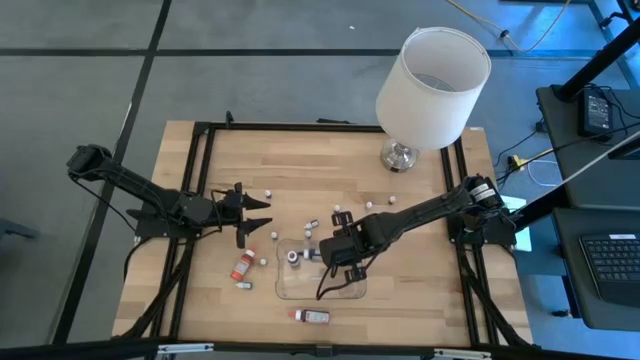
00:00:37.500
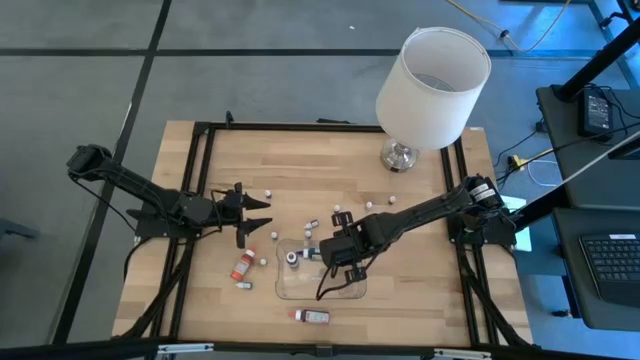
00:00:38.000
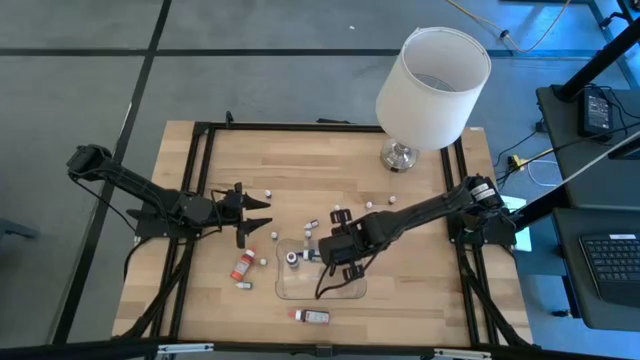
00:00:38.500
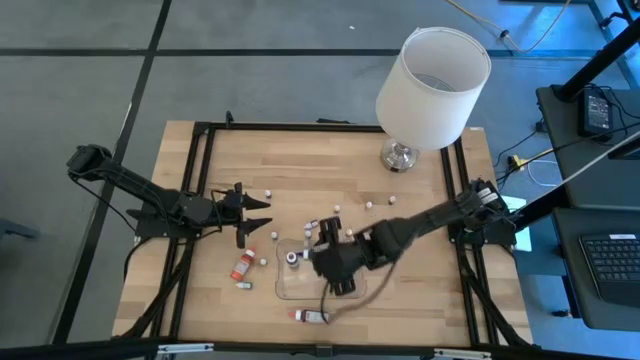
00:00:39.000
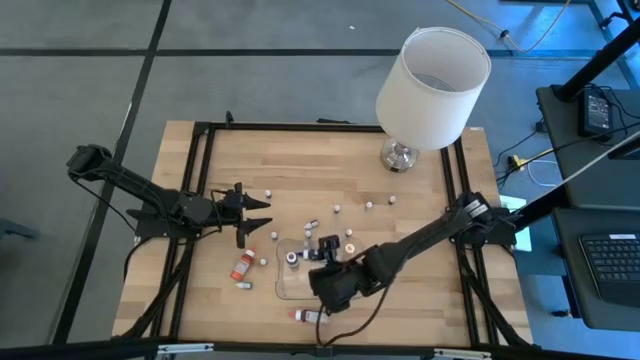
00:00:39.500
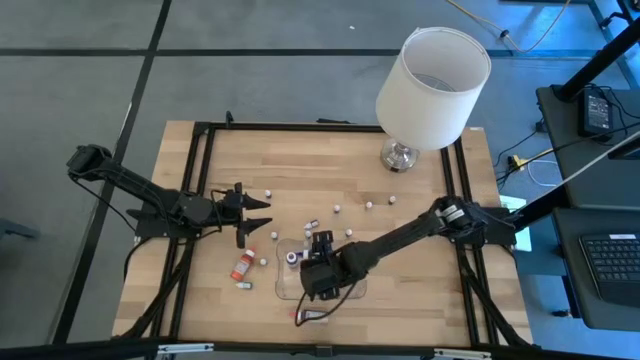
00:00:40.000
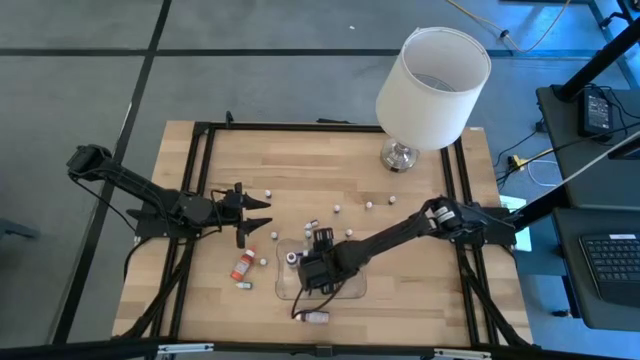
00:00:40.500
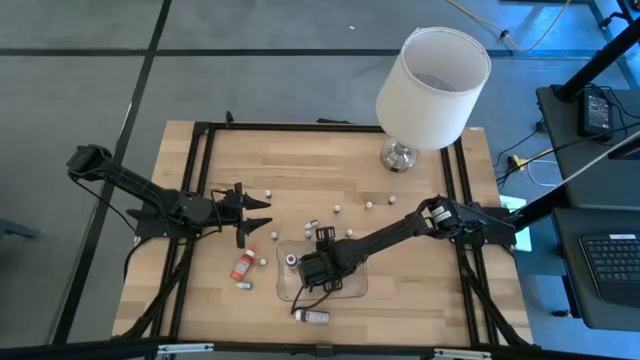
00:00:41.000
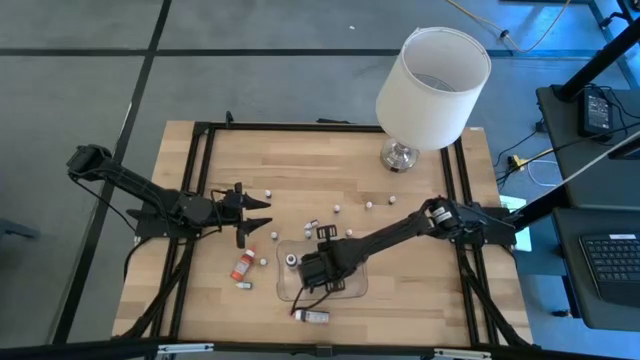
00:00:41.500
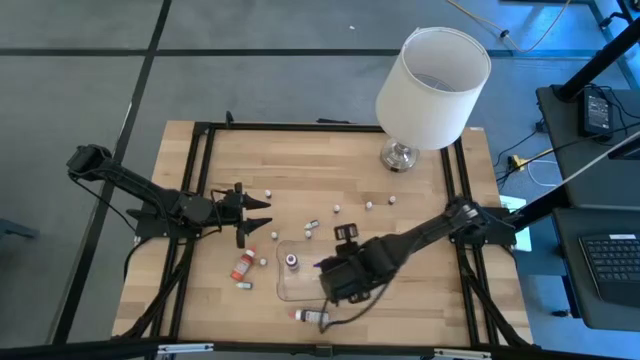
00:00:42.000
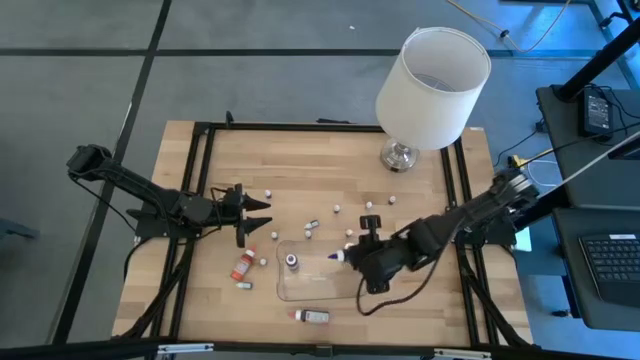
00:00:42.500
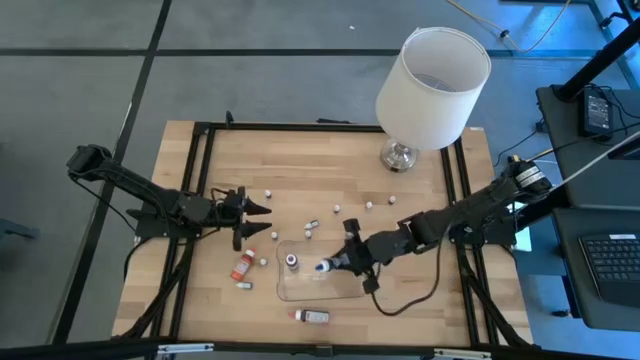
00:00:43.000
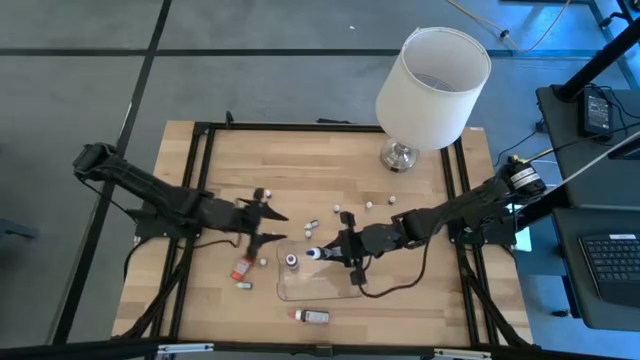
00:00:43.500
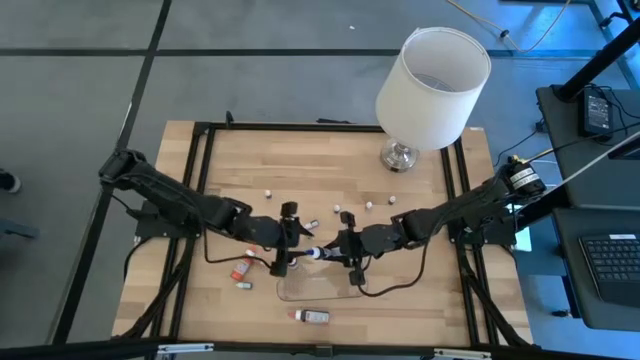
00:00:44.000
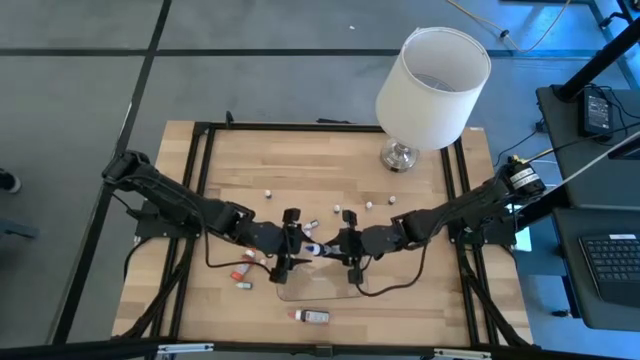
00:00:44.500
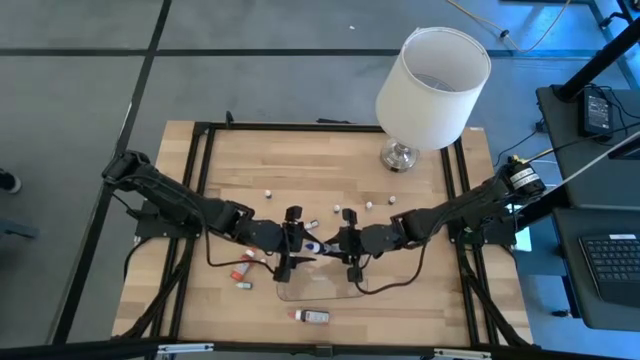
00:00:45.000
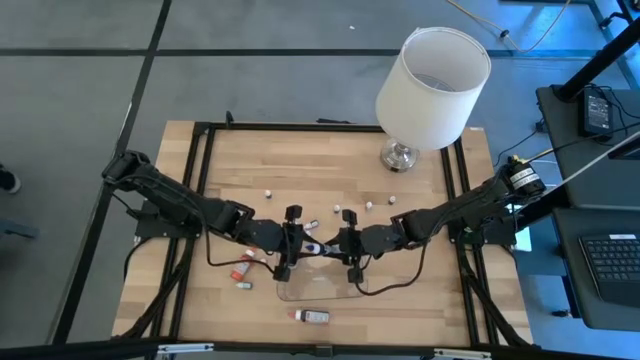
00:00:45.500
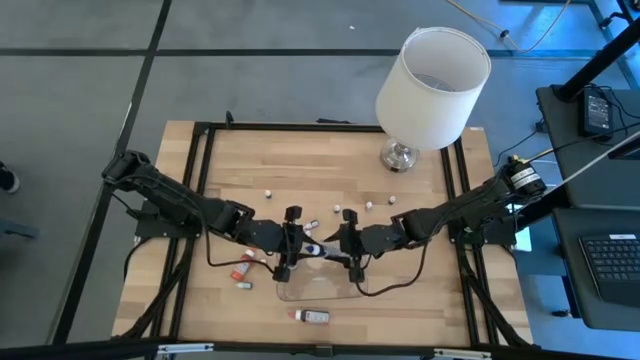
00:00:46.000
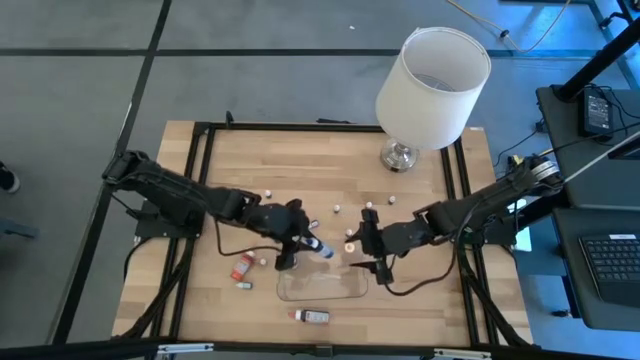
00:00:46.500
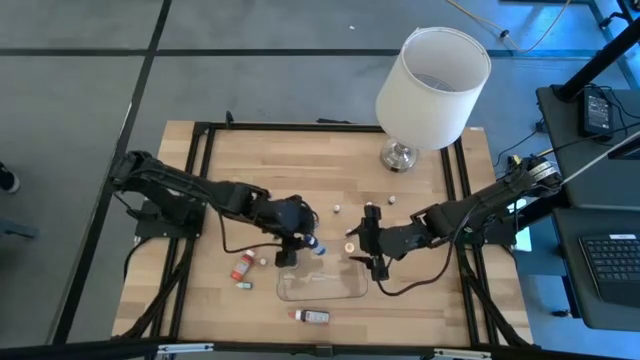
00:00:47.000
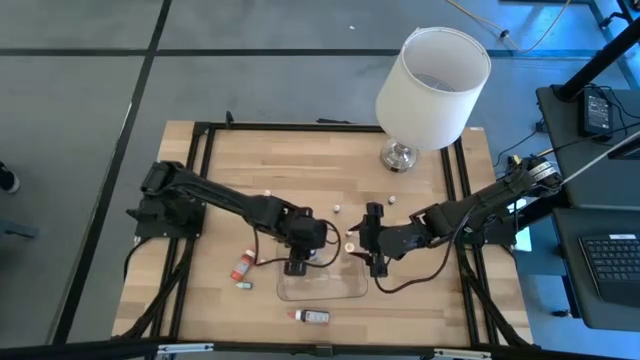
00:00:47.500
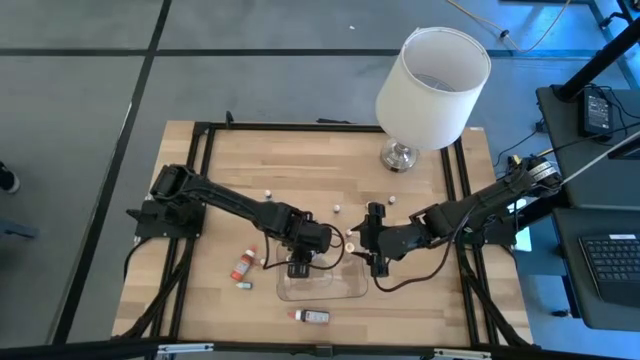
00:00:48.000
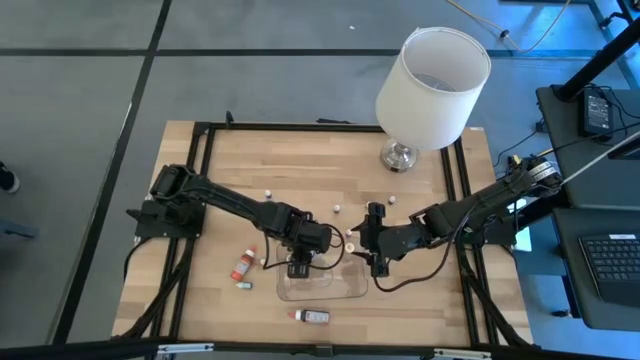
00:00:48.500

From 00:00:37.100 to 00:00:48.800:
Task: Pick & Place food coloring
Put the big blue food coloring bottle into the container

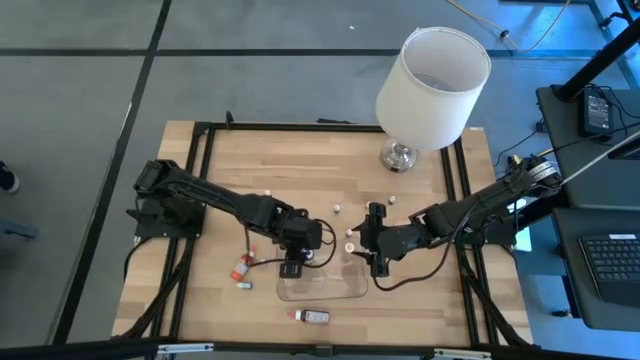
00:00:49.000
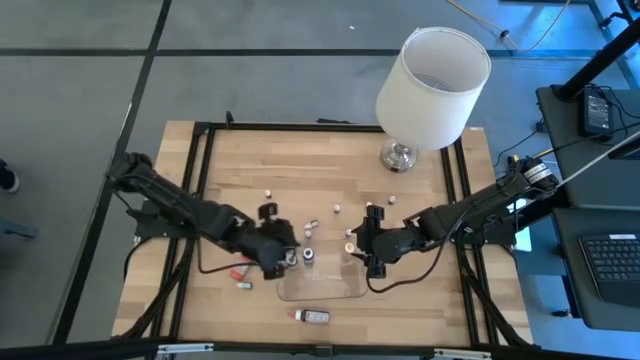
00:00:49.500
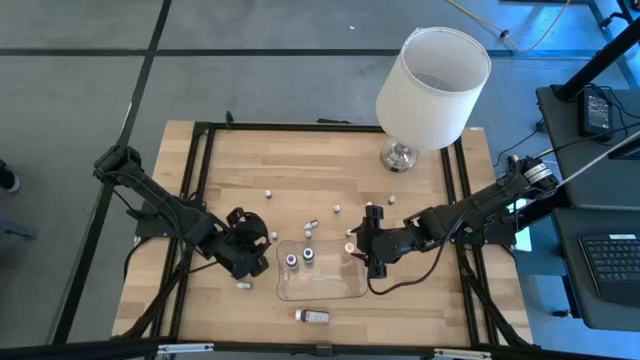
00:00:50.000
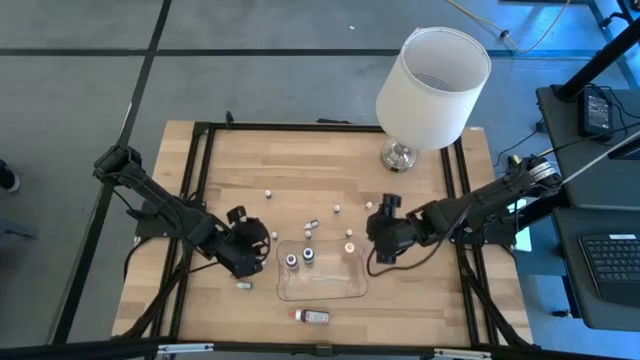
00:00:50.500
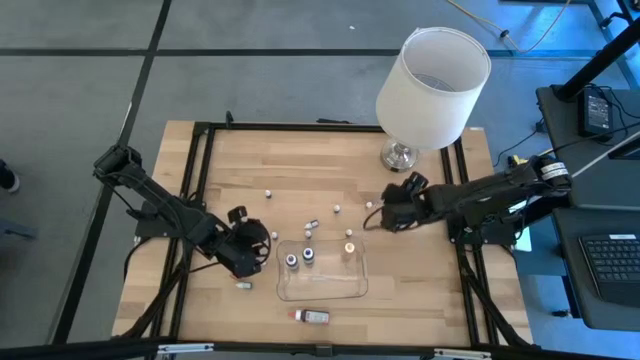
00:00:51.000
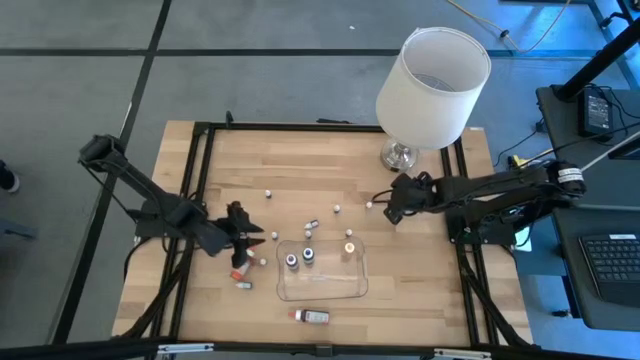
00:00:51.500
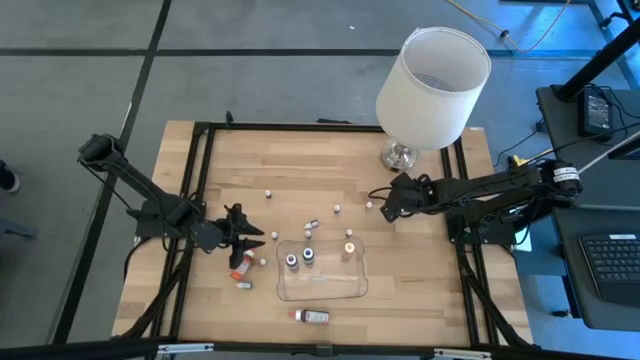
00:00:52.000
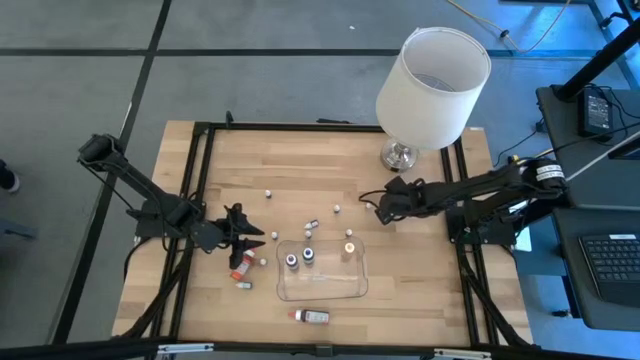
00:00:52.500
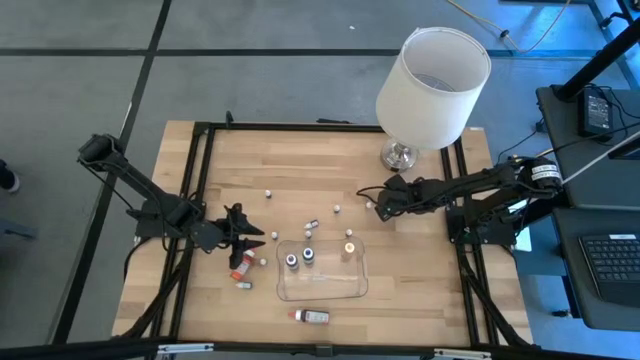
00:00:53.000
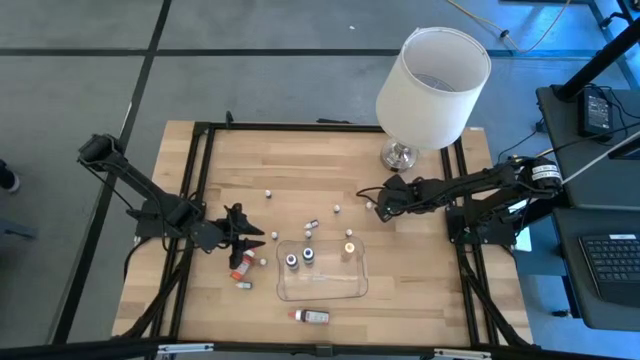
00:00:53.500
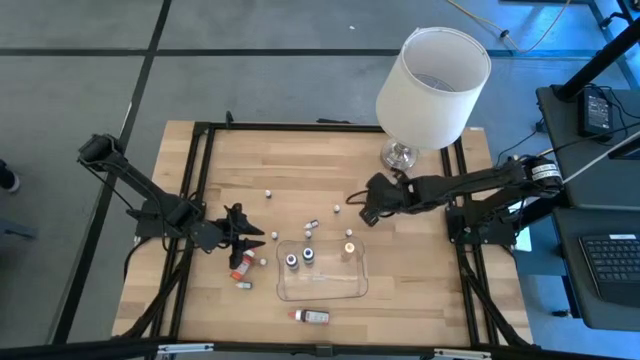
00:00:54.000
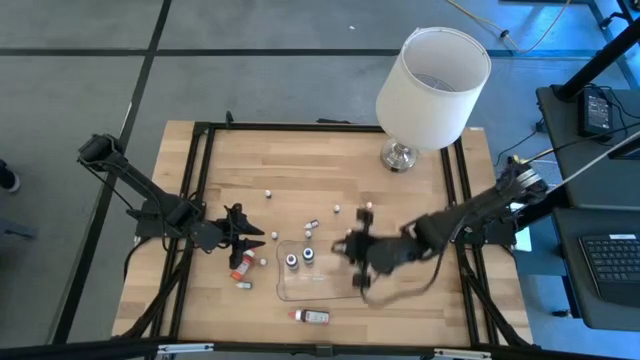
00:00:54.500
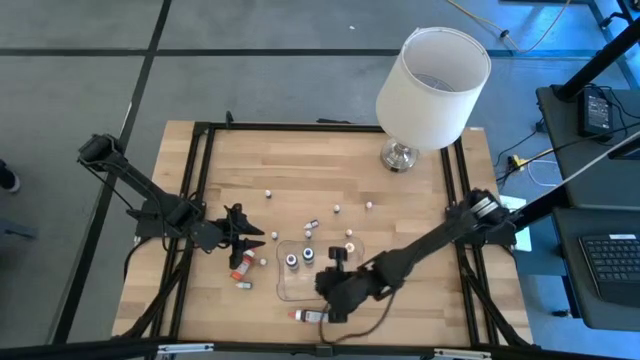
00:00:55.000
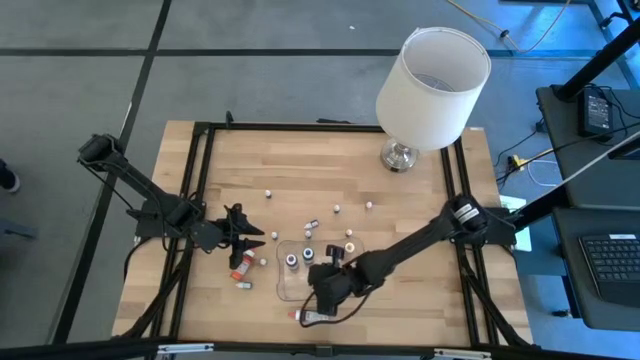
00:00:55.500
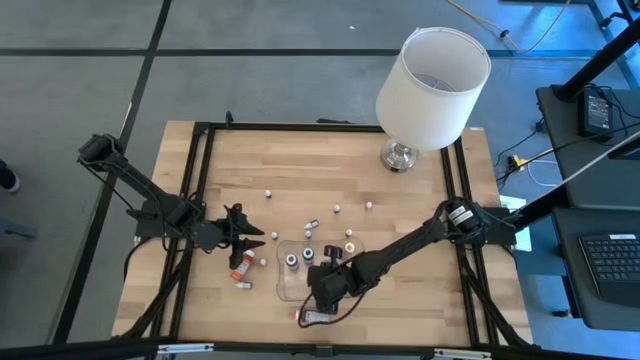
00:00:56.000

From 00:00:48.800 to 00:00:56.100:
Put the small pink food coloring bottle into the container

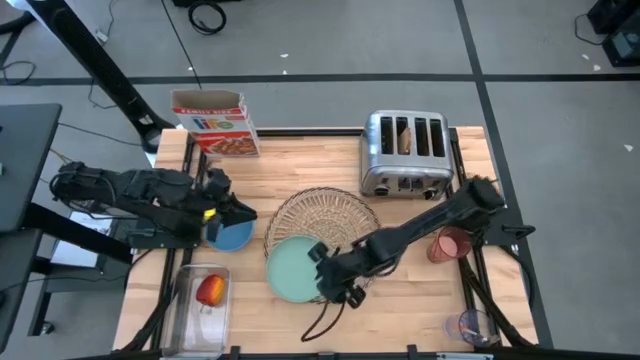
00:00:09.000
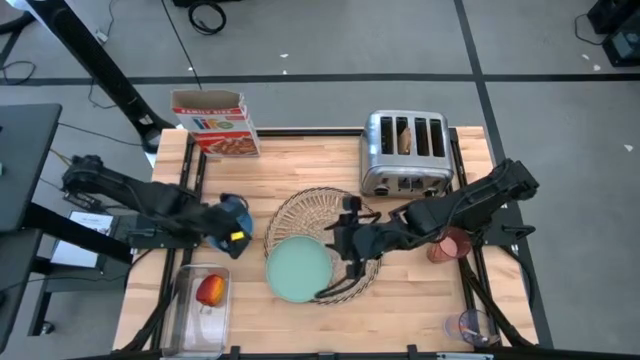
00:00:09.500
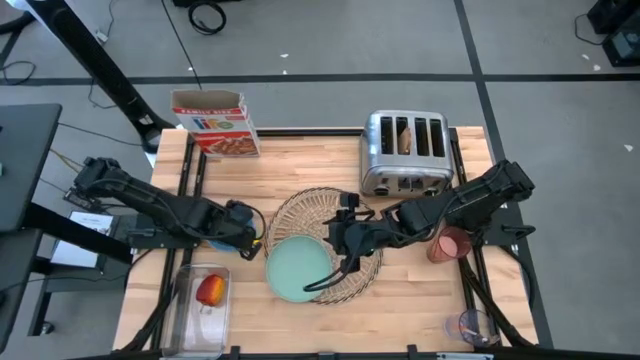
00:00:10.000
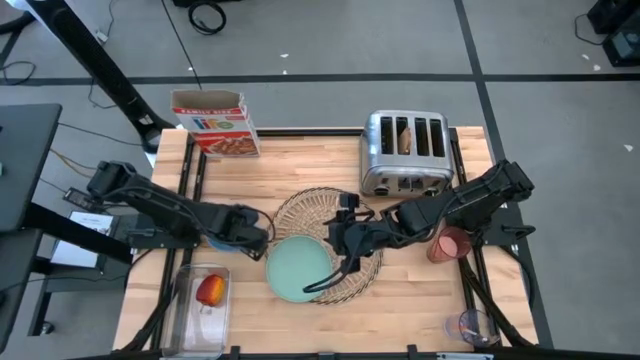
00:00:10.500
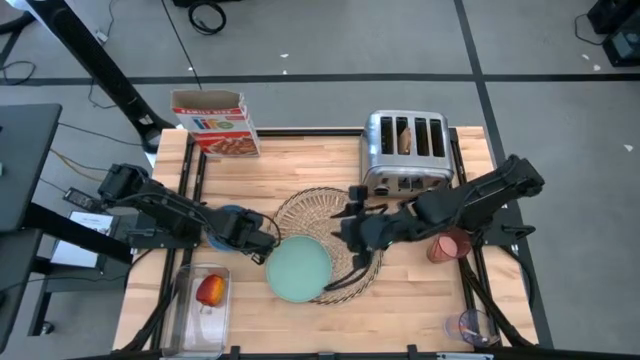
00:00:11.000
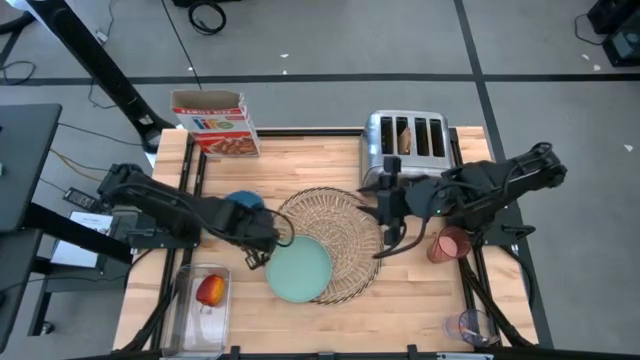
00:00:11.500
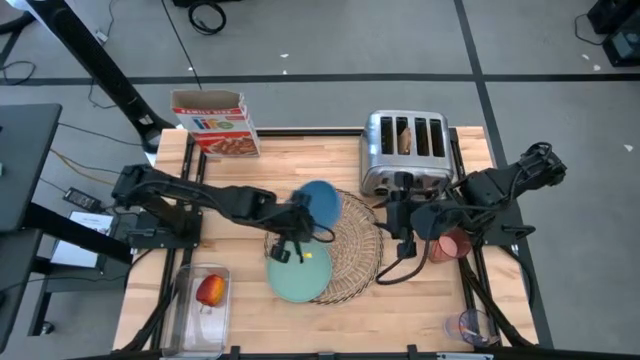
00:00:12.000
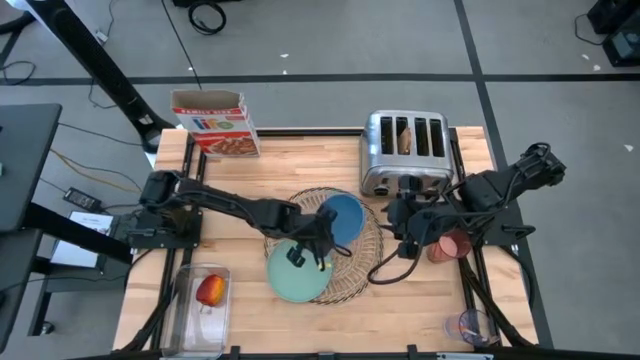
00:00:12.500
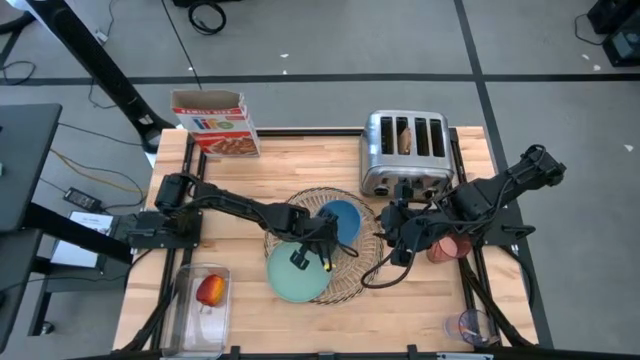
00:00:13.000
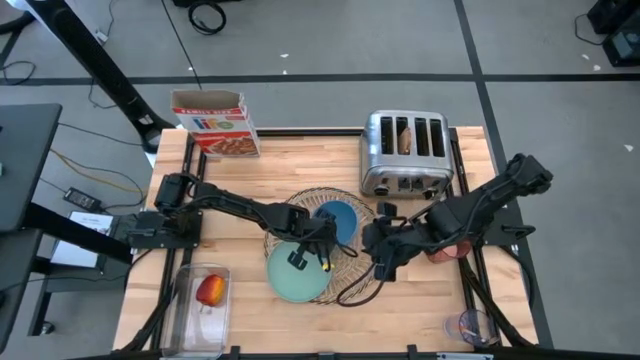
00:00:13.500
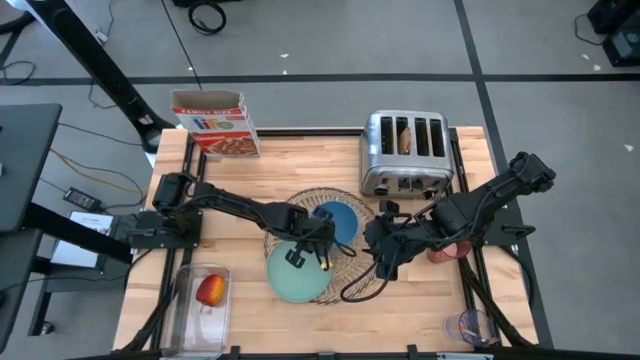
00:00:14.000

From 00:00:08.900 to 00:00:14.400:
Task: Arrange a breakfast setting
Put the blue bowl on the brown tablemat to the top right of the light green bowl
